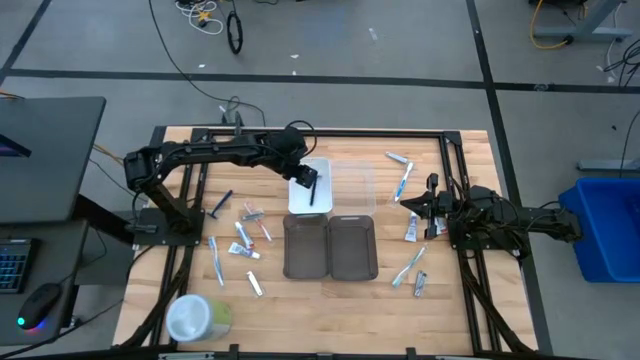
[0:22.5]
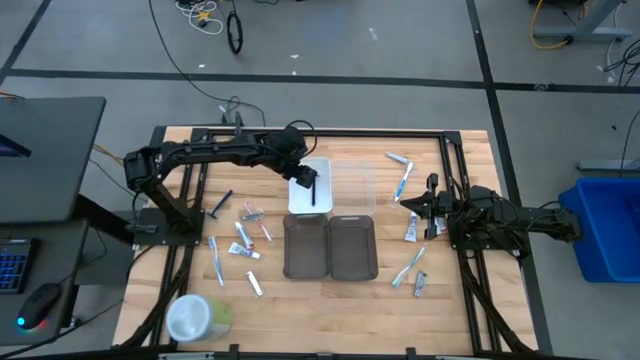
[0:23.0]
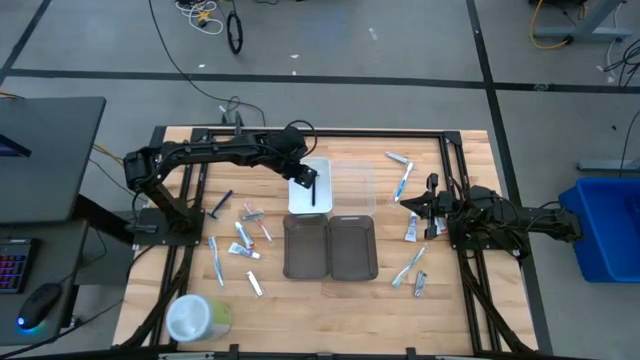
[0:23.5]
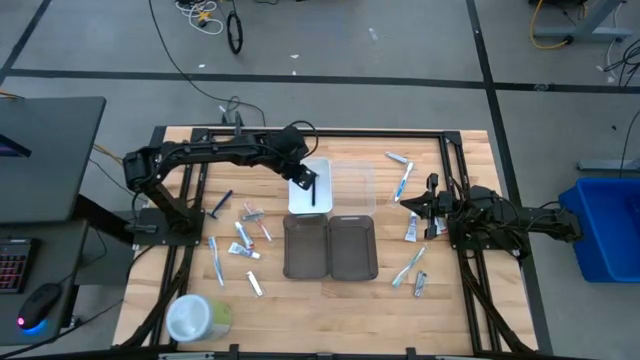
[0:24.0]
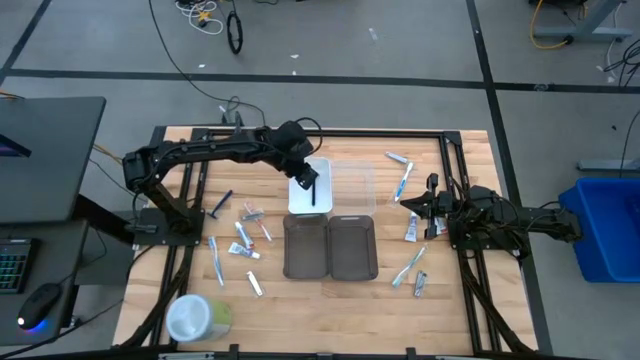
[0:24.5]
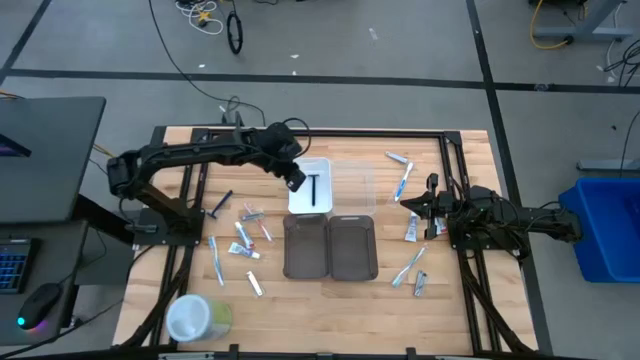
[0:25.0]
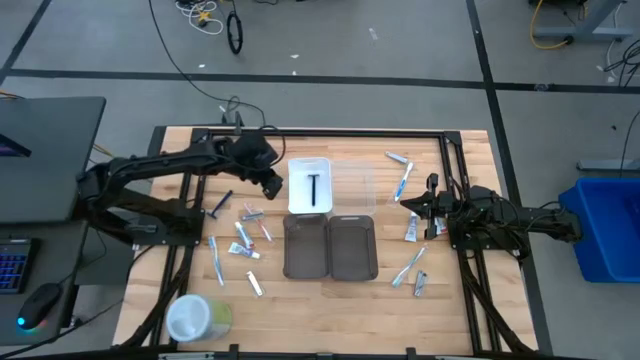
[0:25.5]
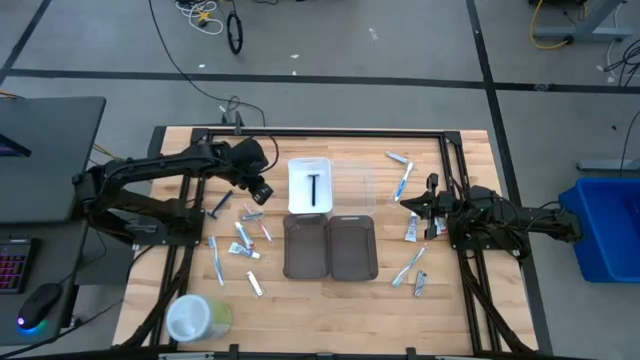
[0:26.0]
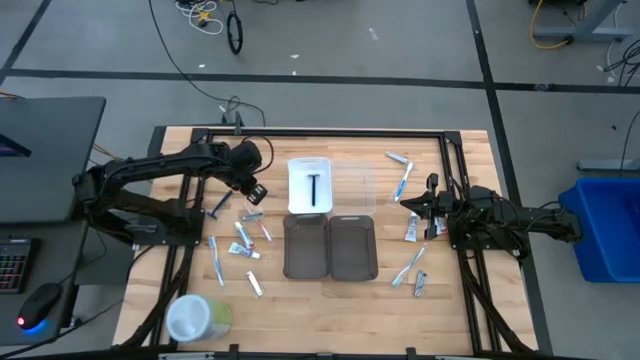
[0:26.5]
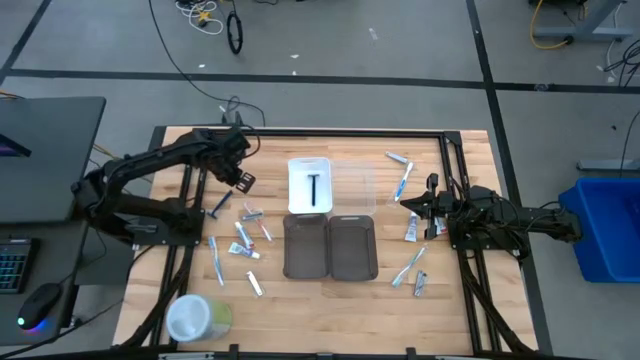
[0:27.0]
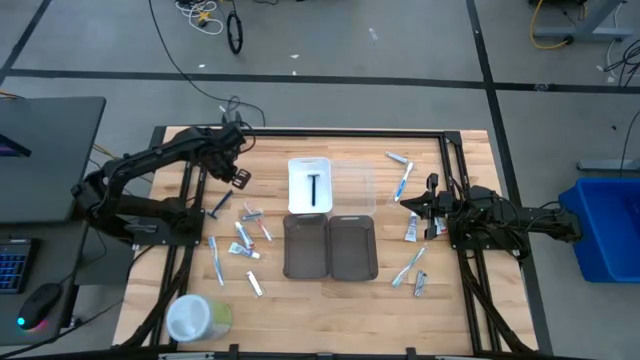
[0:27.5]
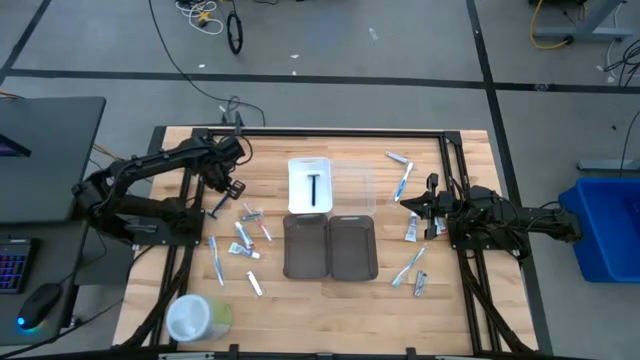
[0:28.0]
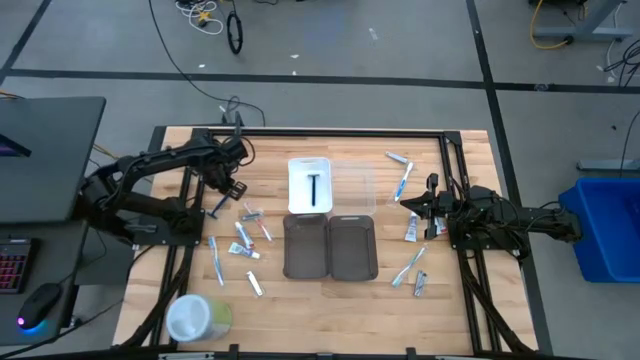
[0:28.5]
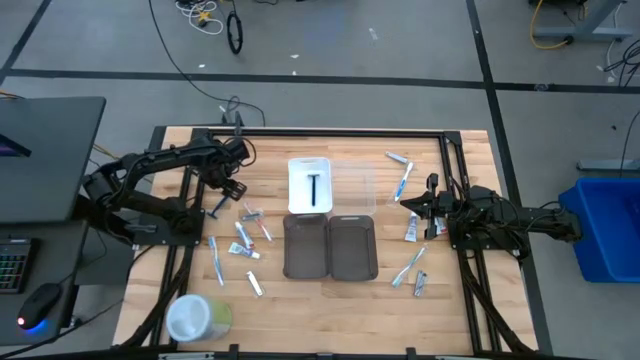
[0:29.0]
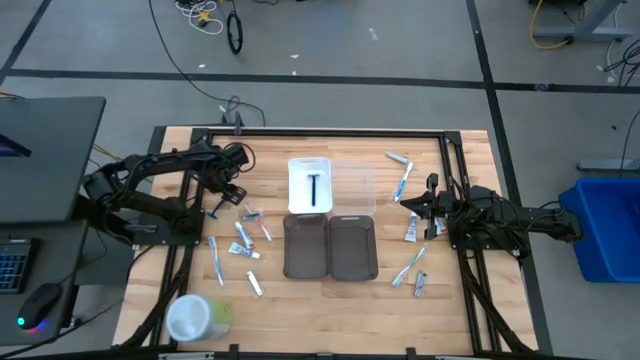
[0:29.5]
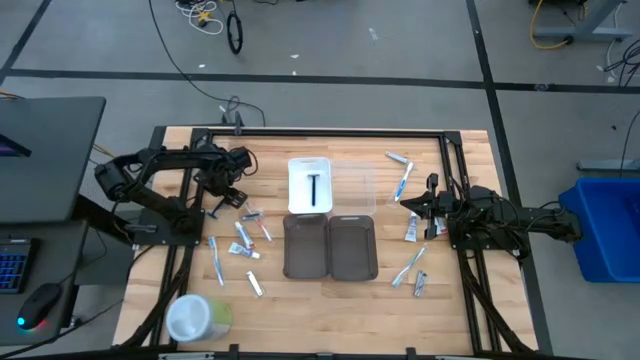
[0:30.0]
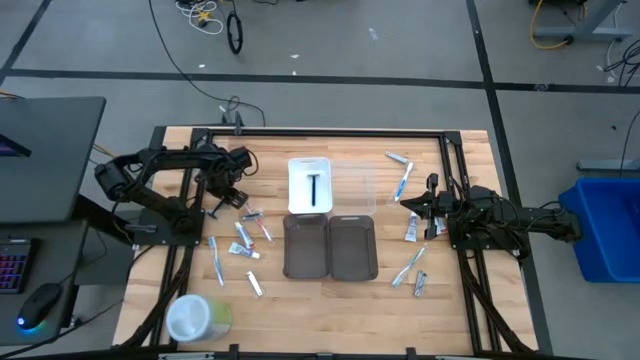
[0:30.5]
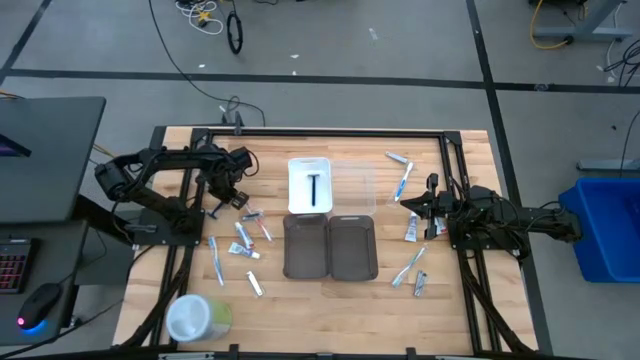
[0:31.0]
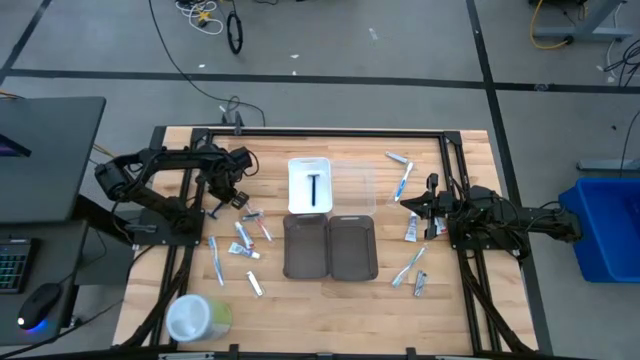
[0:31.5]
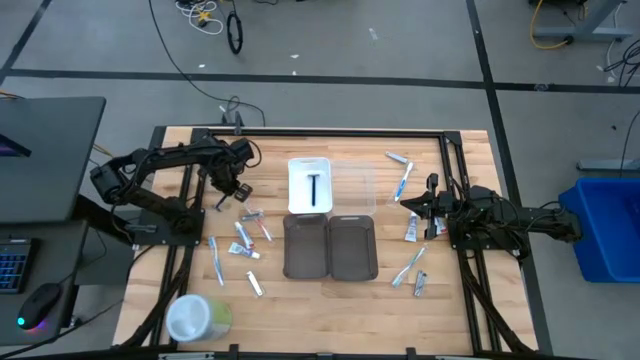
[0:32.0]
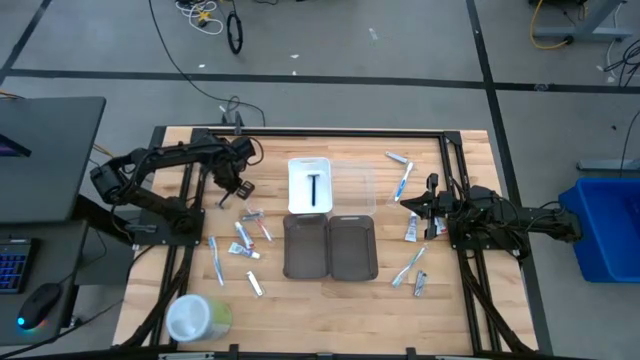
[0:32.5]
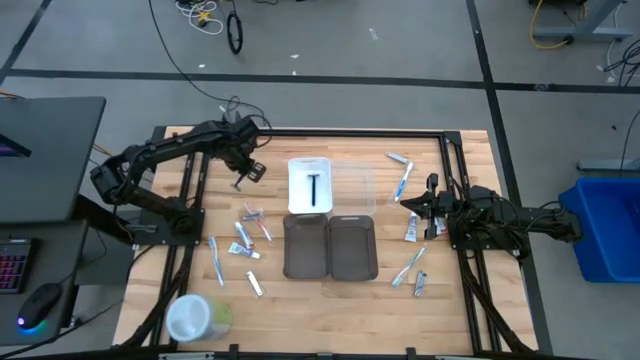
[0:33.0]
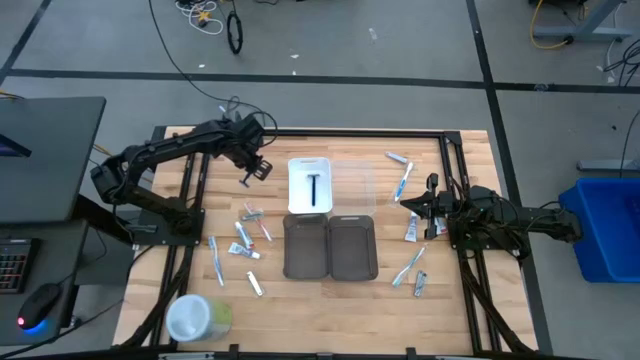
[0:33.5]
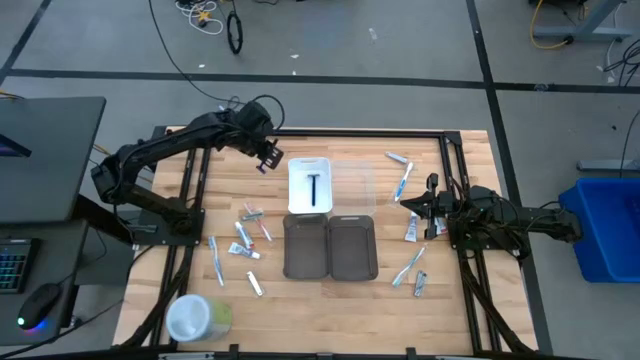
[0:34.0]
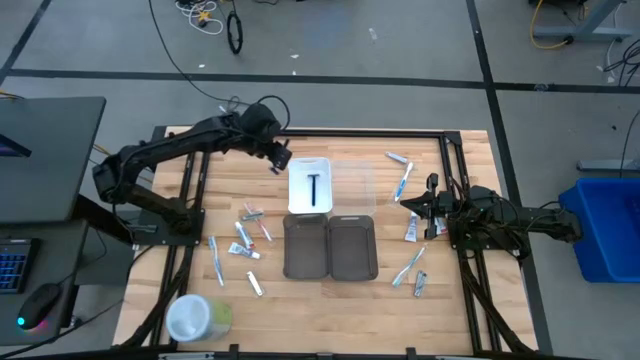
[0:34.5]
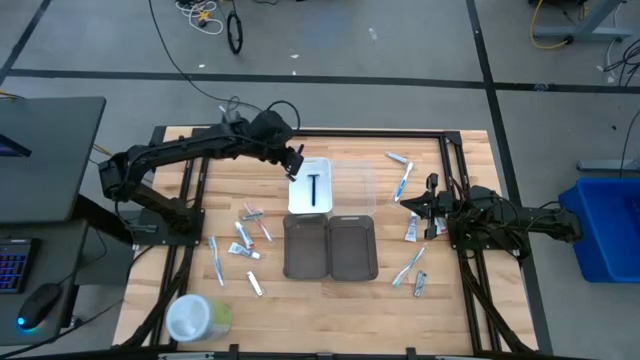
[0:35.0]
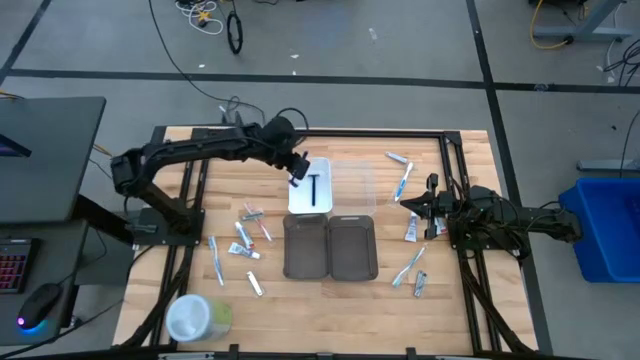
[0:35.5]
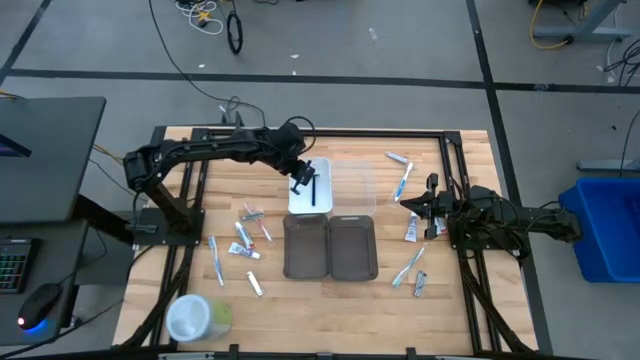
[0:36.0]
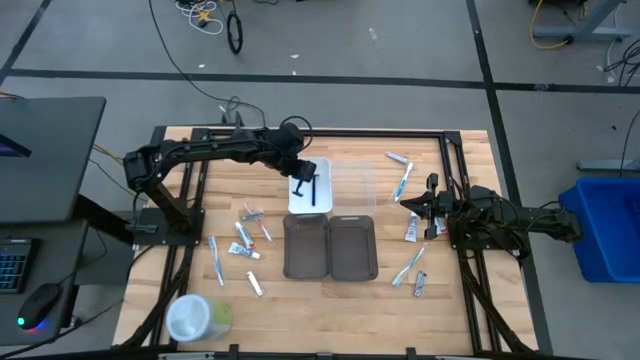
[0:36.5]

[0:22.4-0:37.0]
Task: Pick & Place Travel size toiletries
Put the blue razor into the white bin

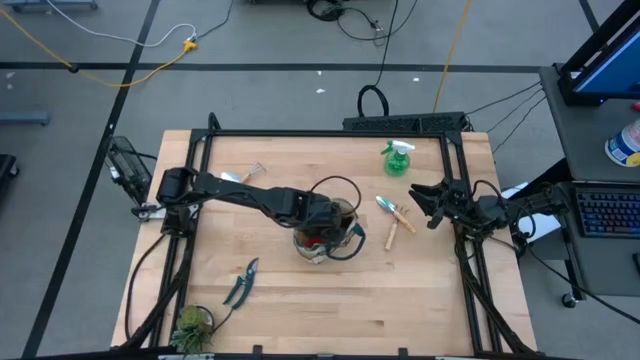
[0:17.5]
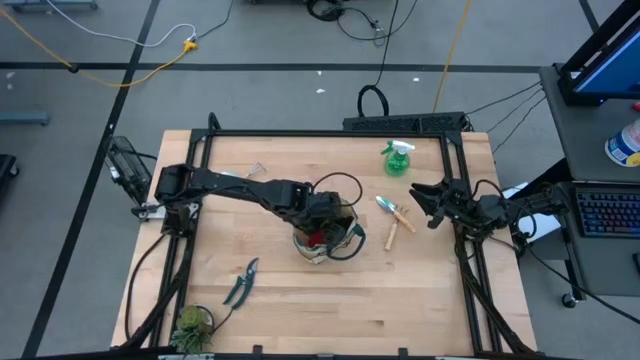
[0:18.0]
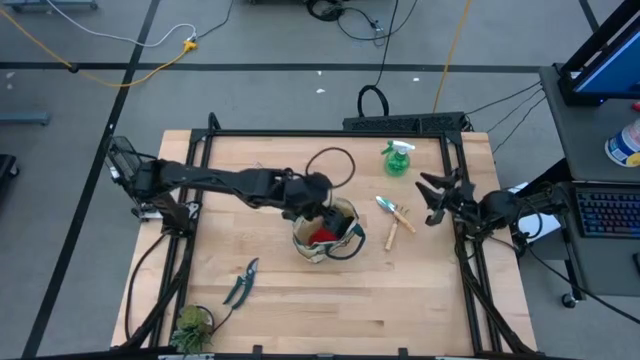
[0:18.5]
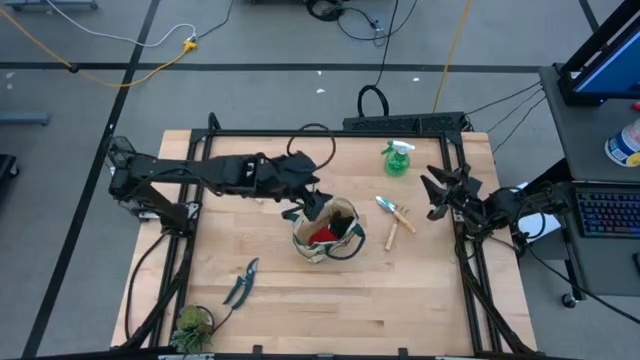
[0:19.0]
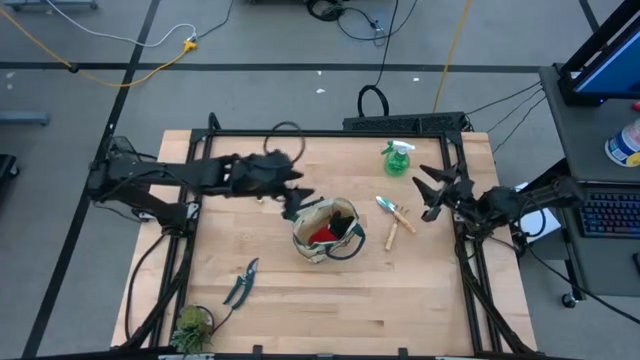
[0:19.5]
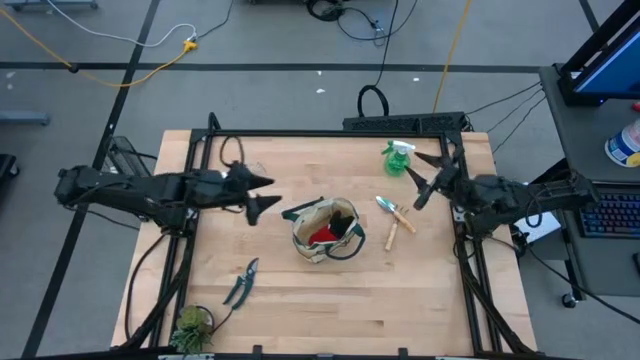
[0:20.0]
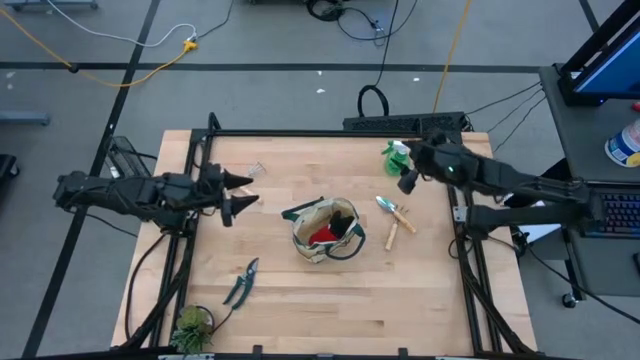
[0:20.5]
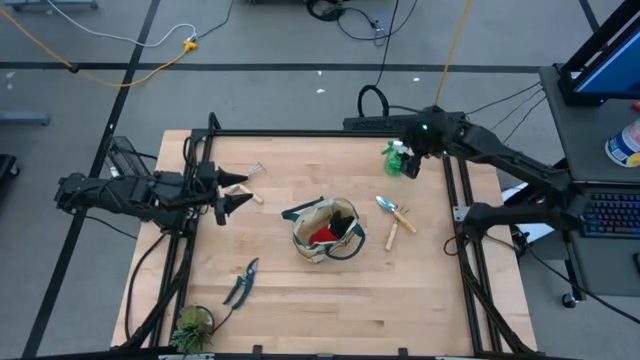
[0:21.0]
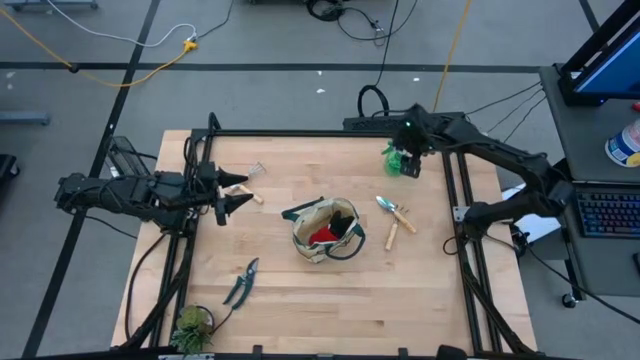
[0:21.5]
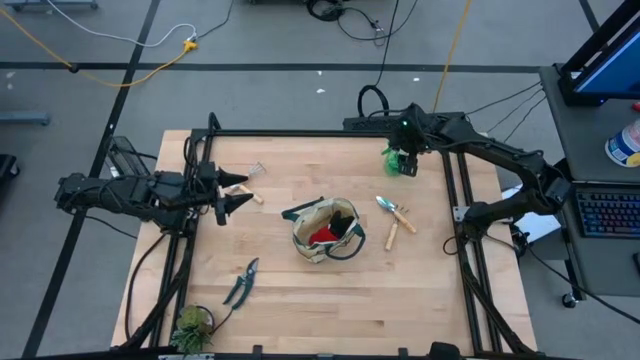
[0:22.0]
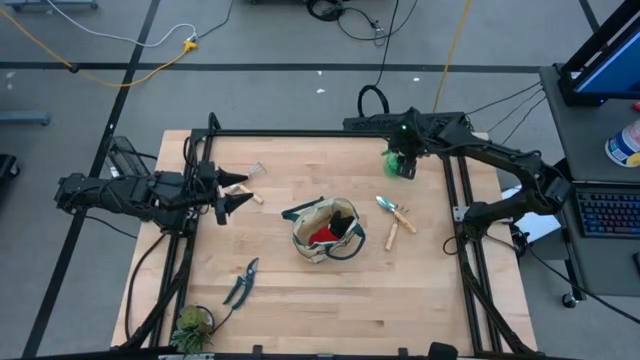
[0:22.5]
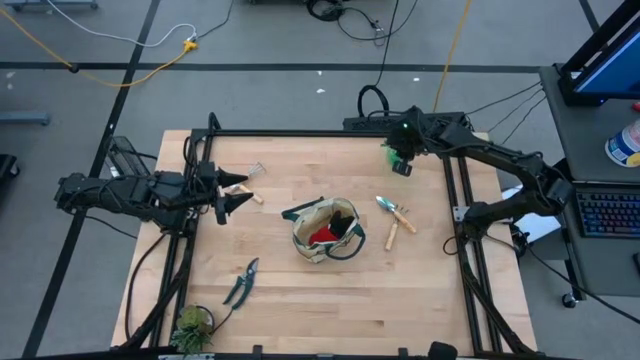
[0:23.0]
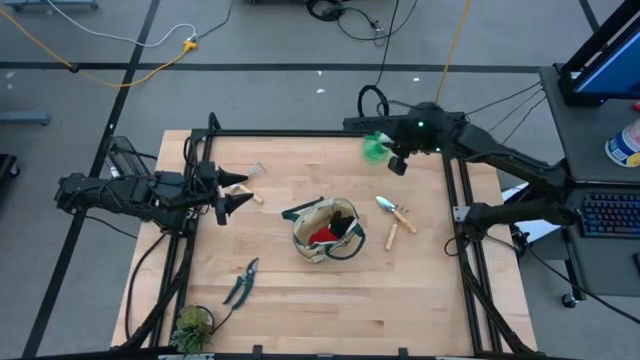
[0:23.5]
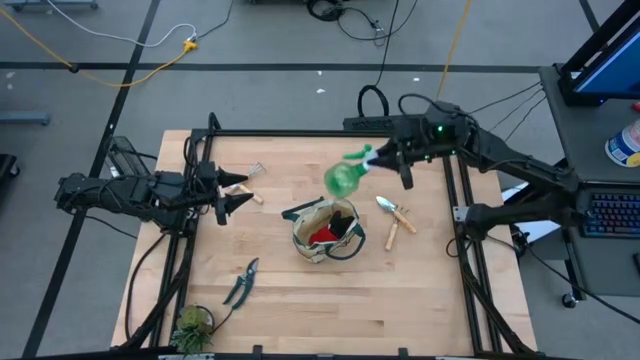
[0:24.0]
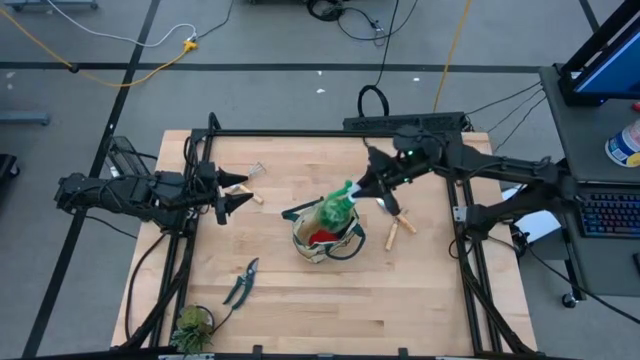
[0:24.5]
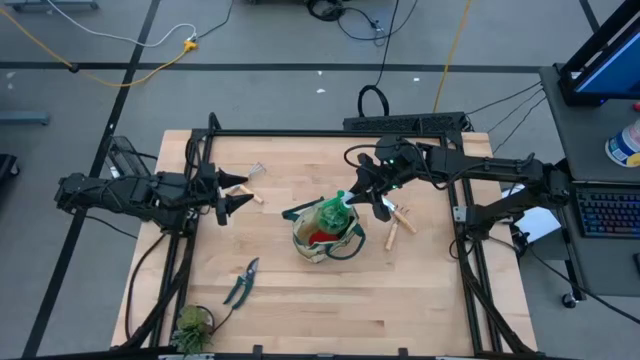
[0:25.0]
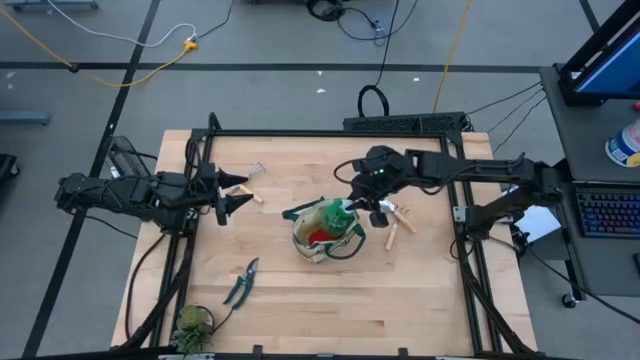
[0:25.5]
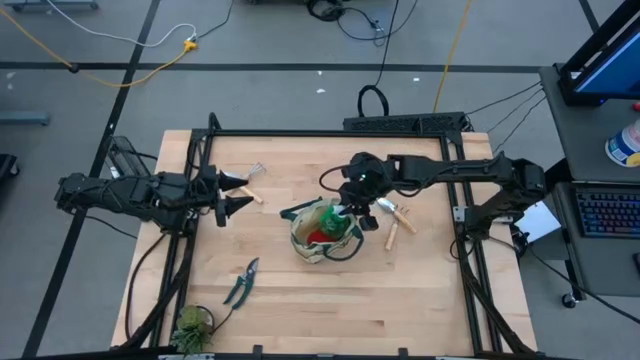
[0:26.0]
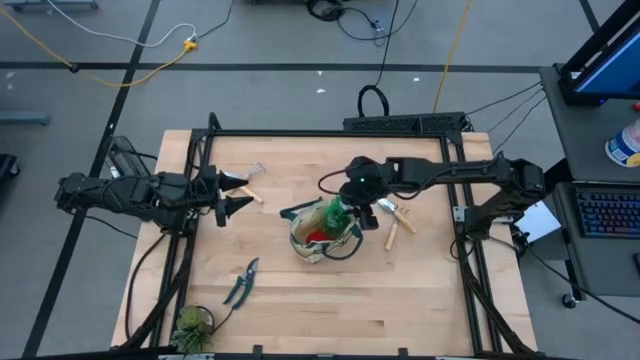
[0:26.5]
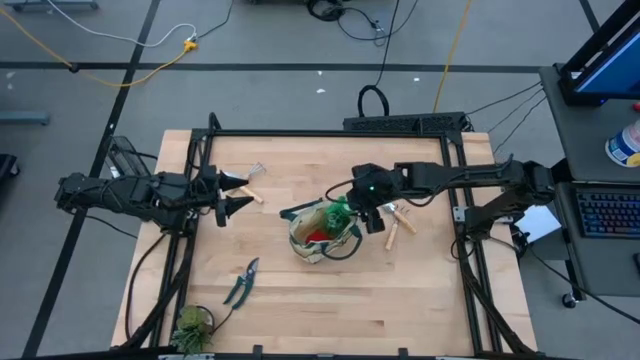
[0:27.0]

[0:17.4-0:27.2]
Task: Pick & Place Garden tools in Gardening bag
Put the green spray bottle into the gardening bag
